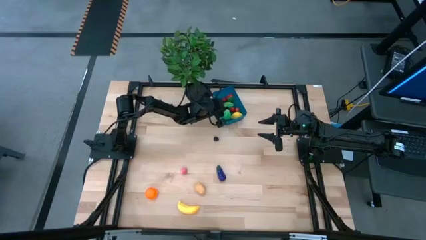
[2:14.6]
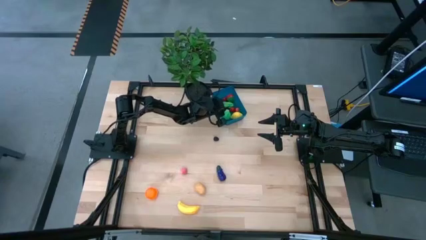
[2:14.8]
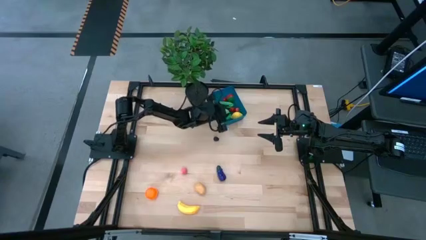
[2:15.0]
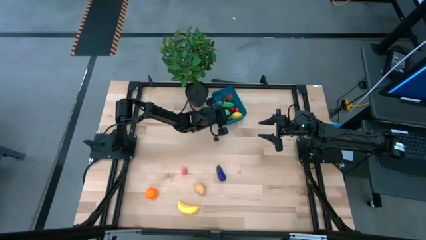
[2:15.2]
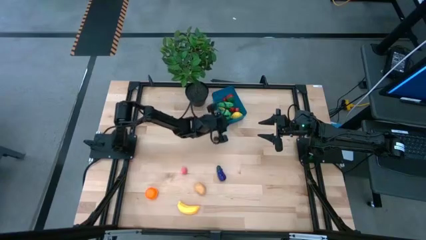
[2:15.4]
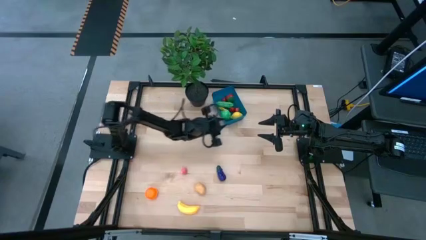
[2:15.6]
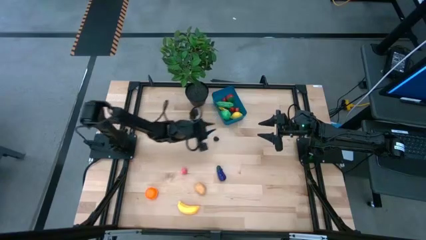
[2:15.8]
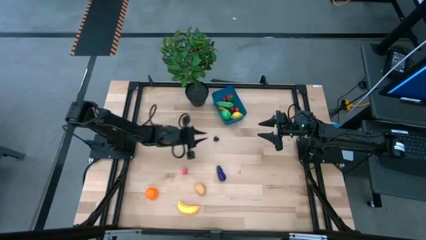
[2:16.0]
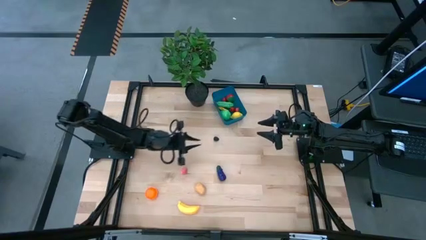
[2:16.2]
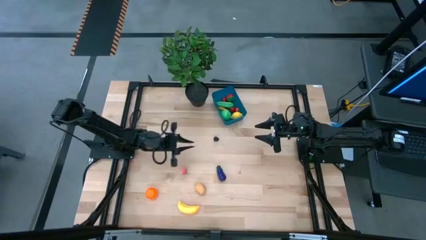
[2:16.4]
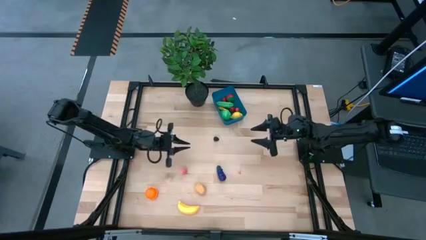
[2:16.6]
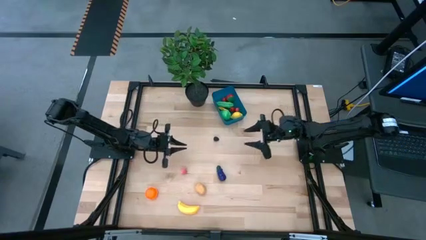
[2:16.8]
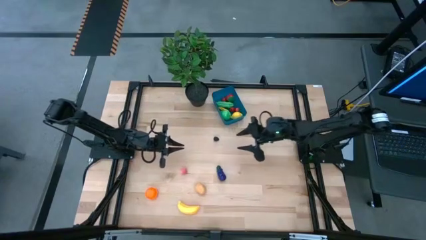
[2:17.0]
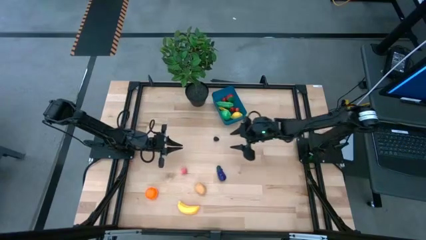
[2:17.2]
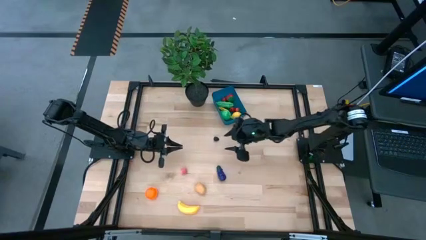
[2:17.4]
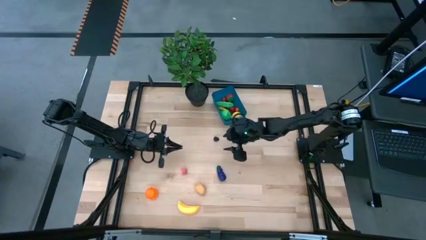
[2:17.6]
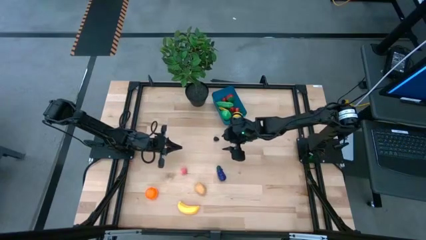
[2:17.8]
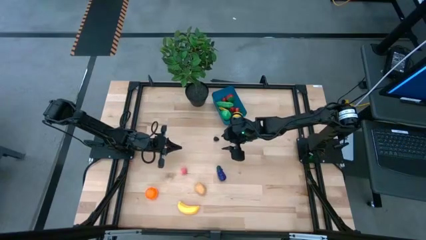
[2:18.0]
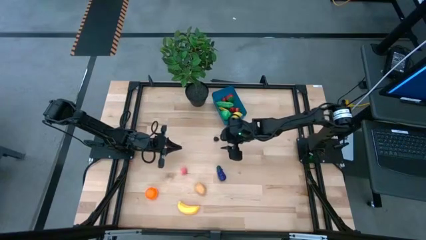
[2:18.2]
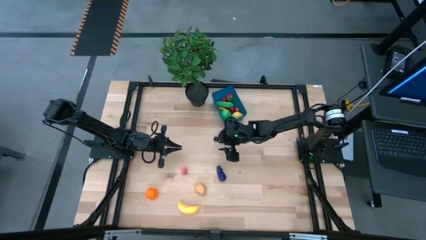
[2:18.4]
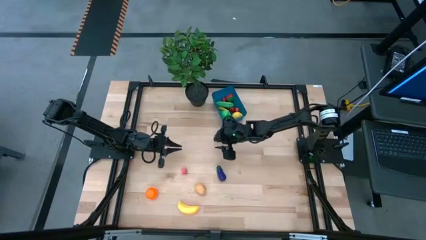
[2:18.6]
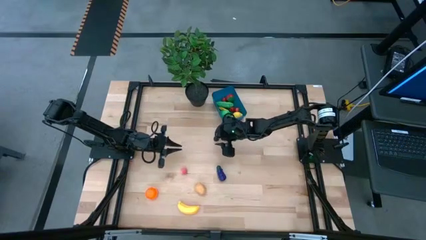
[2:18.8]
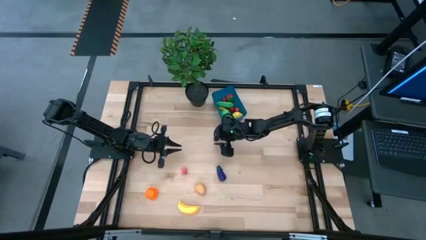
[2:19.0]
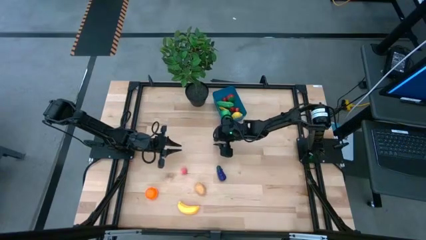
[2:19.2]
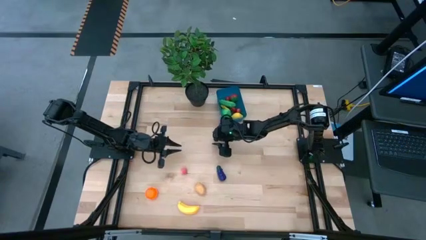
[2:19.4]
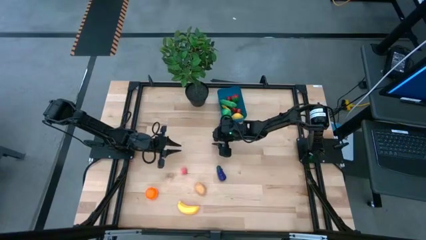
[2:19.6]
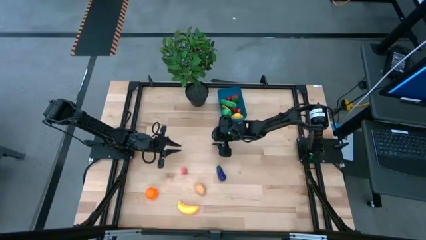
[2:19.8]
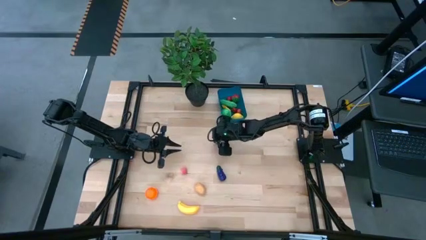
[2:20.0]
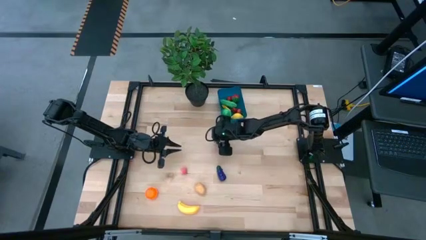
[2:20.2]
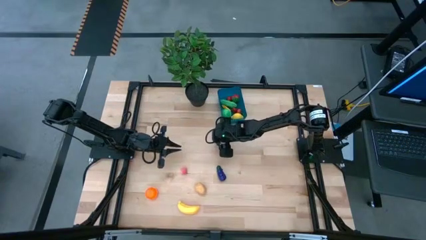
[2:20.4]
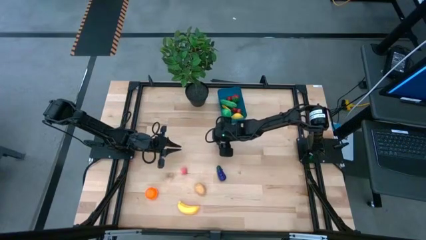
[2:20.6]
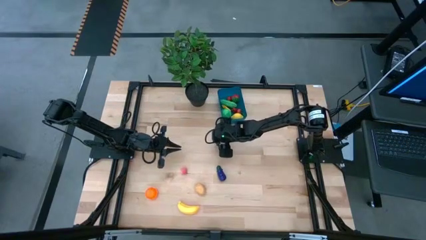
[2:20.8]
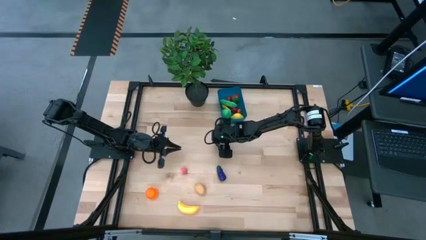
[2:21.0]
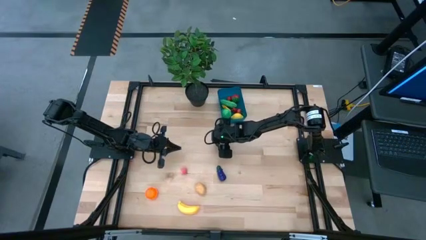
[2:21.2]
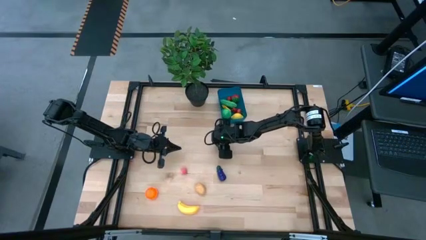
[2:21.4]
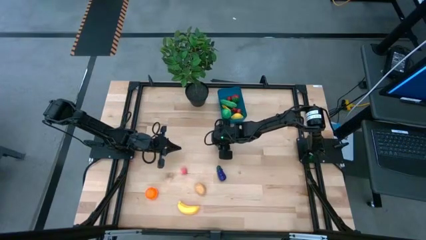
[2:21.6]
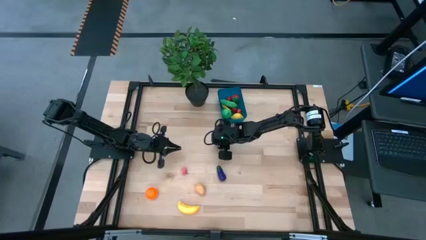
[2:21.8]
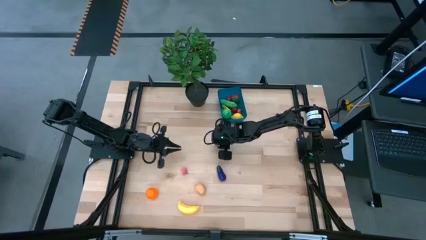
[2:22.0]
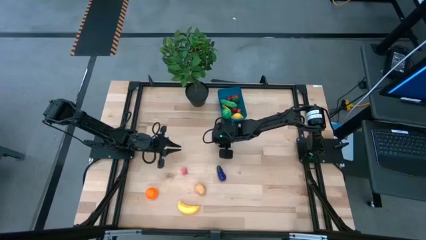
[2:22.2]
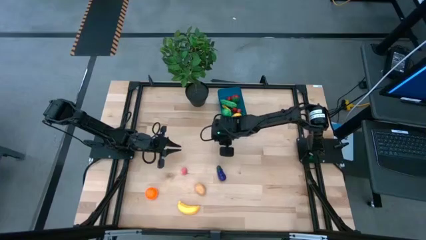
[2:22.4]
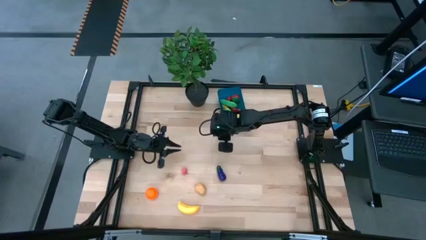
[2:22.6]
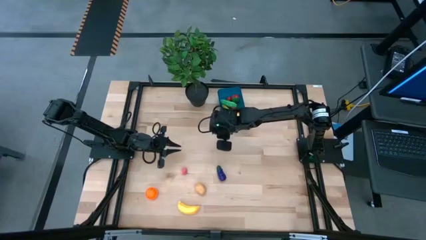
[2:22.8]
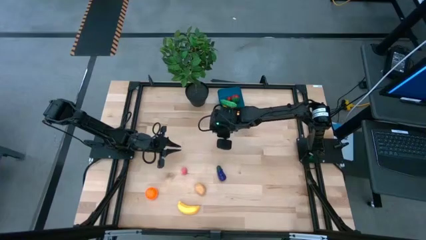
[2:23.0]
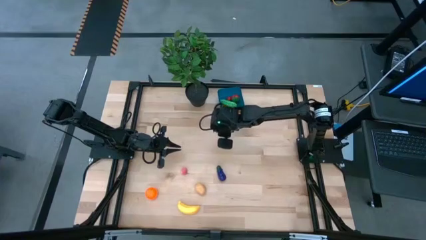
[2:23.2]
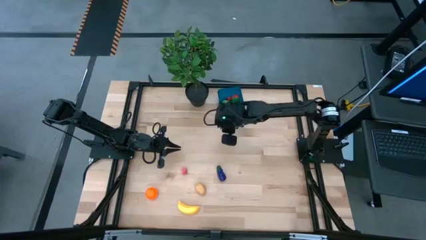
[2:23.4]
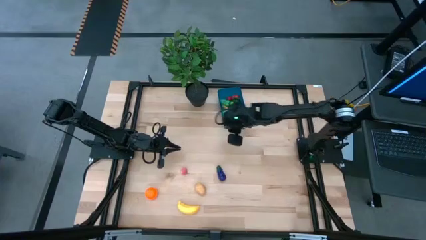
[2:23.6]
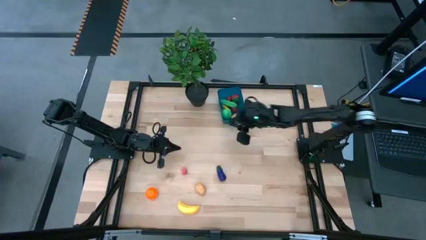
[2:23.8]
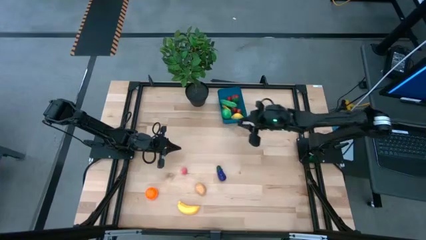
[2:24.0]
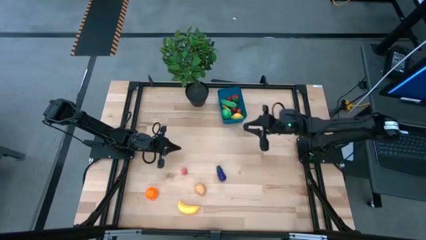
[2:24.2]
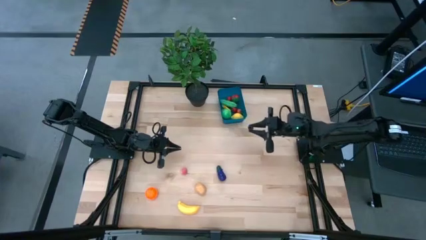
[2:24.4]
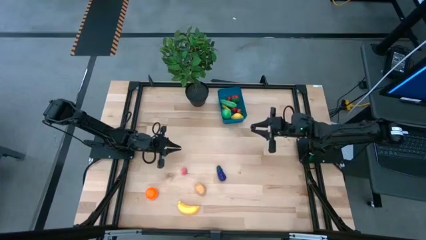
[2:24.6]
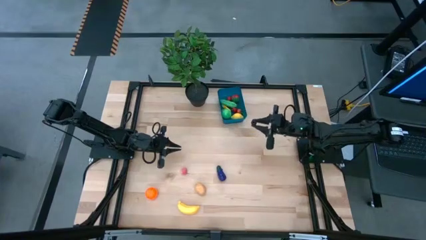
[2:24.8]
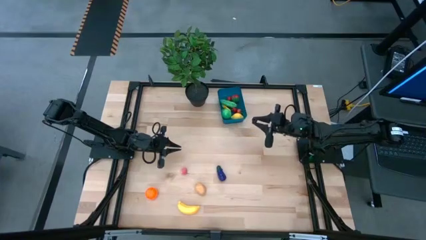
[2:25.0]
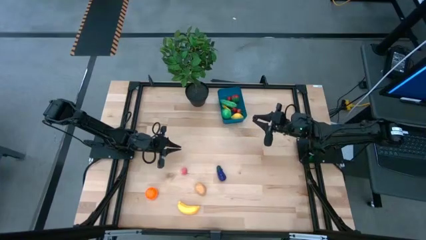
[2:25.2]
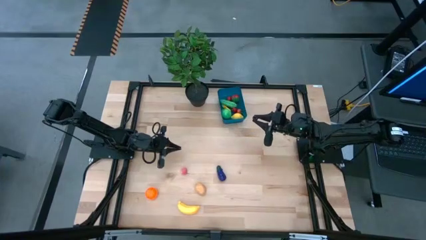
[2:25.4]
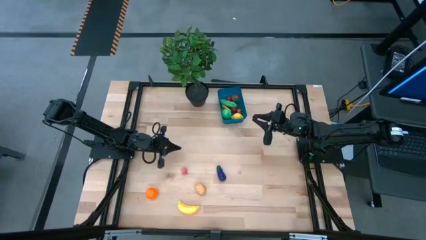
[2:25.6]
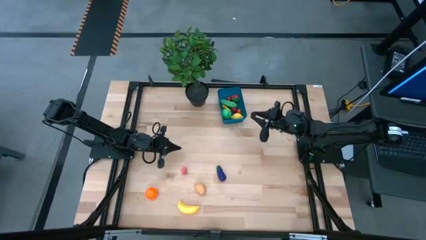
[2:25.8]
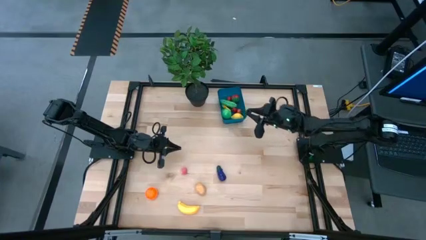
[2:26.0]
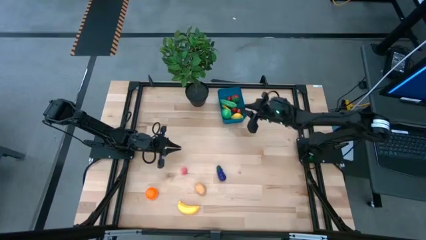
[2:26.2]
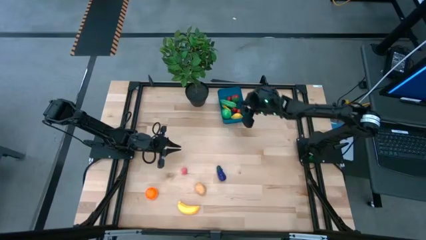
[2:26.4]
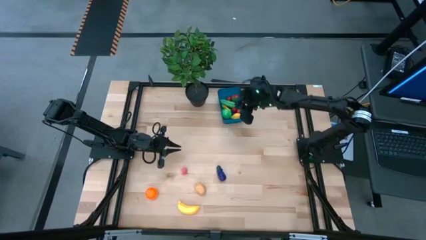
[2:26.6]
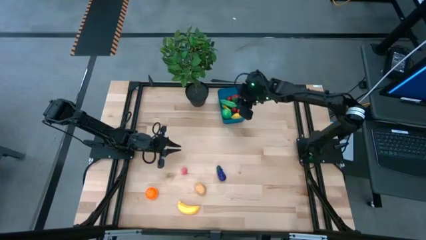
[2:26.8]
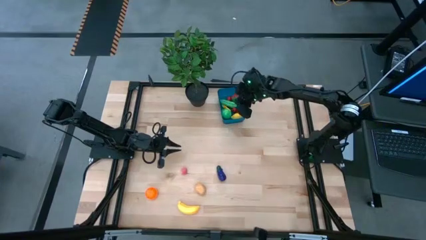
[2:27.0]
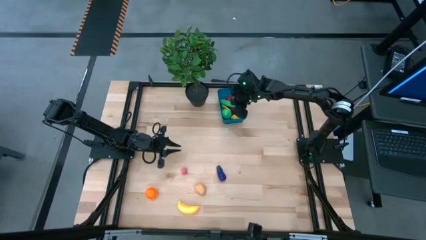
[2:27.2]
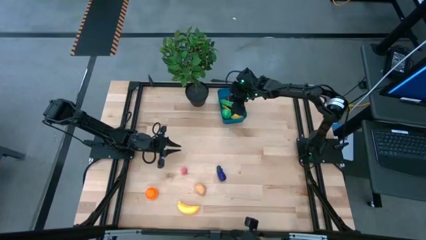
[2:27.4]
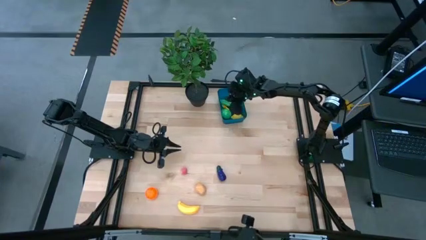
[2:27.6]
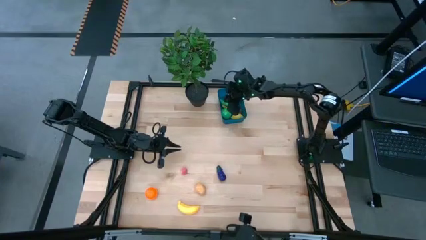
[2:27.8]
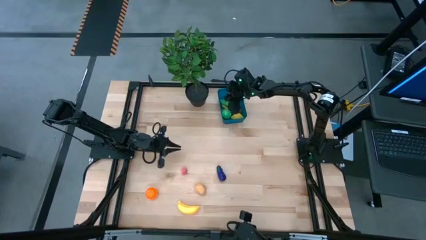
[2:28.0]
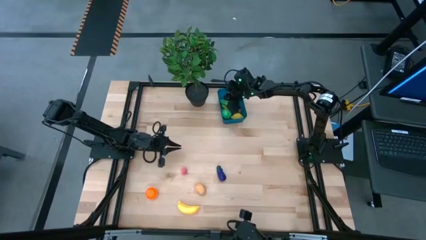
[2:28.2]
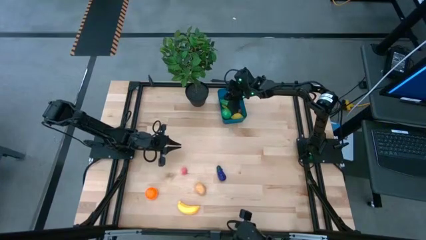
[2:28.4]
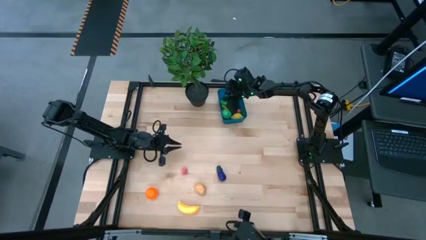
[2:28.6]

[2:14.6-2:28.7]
Task: Pick and placing Produce into tupperware
Put the blackberry into the blue bin
